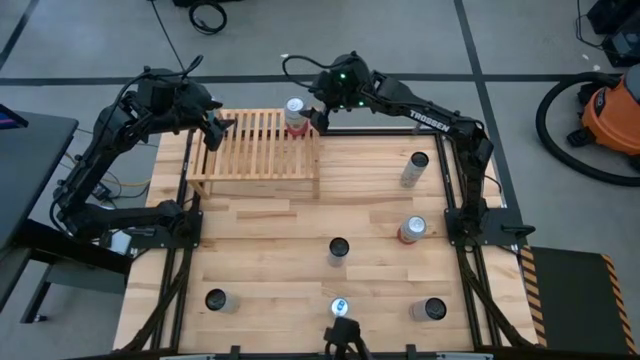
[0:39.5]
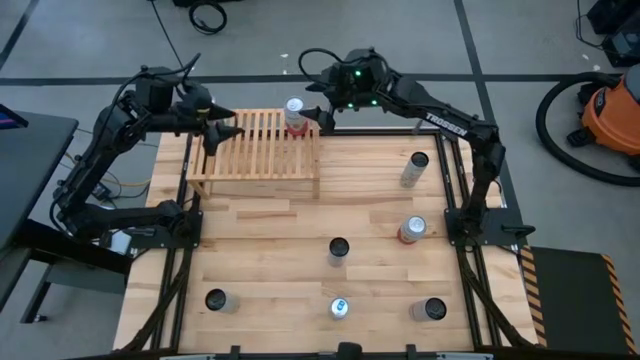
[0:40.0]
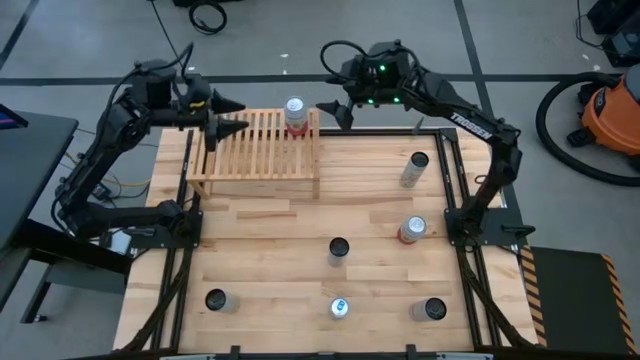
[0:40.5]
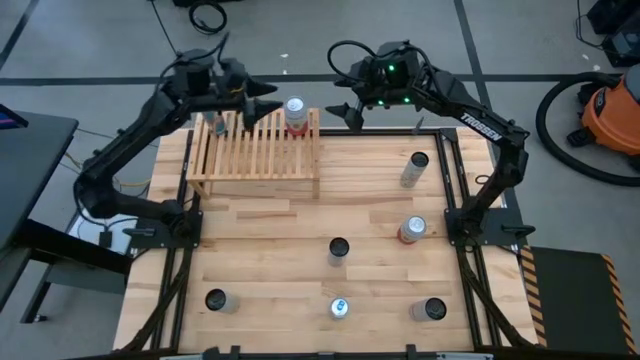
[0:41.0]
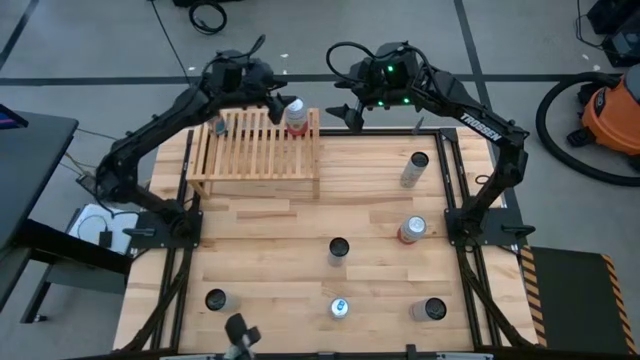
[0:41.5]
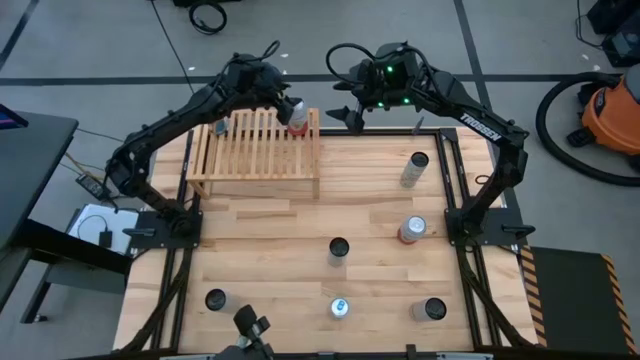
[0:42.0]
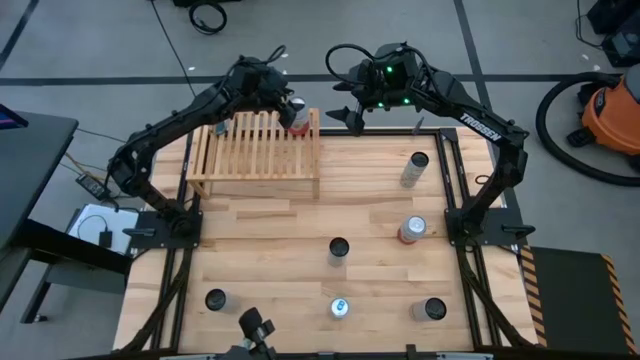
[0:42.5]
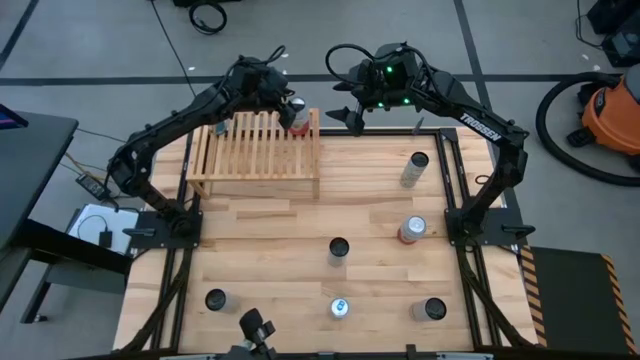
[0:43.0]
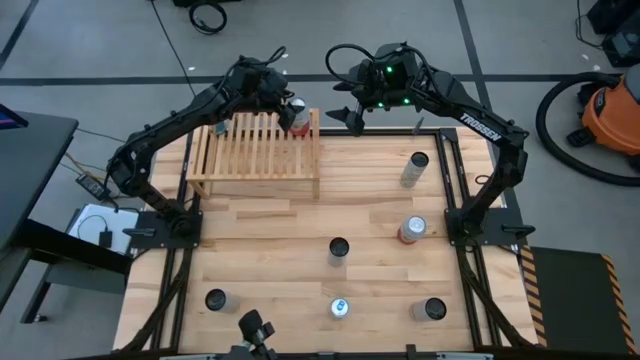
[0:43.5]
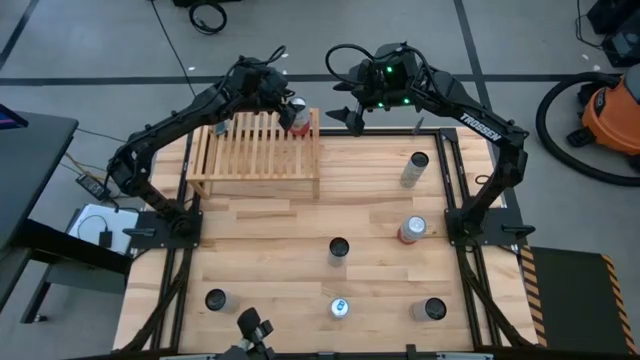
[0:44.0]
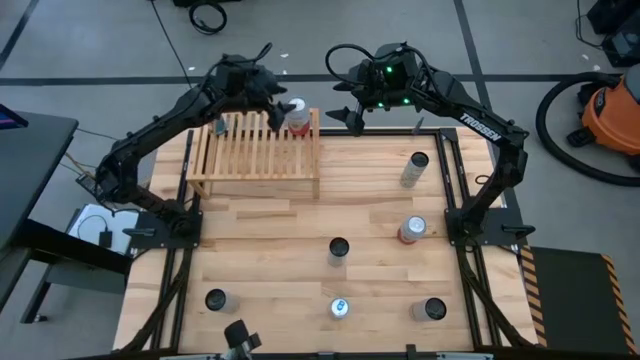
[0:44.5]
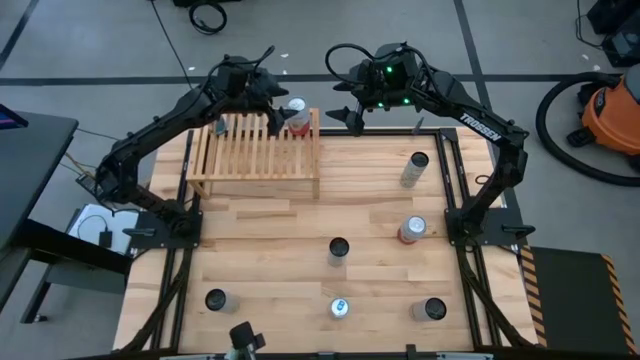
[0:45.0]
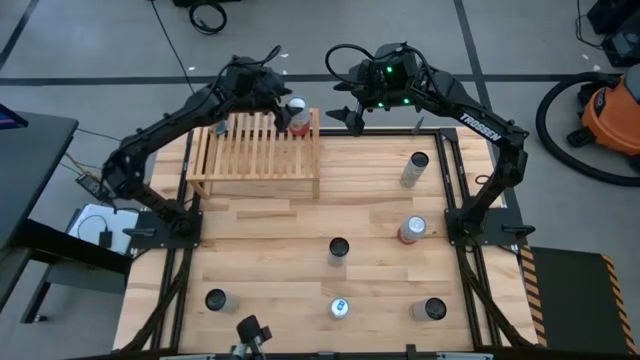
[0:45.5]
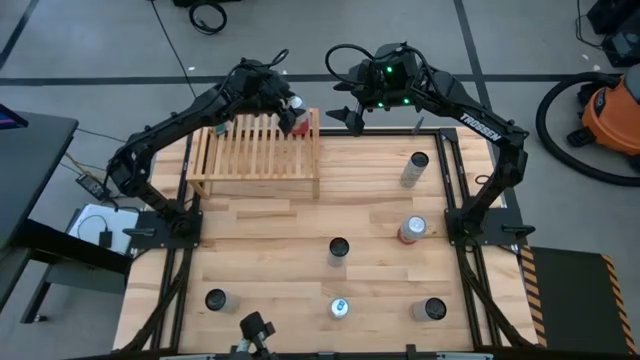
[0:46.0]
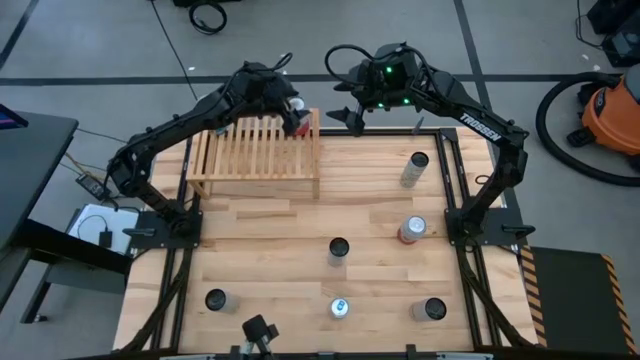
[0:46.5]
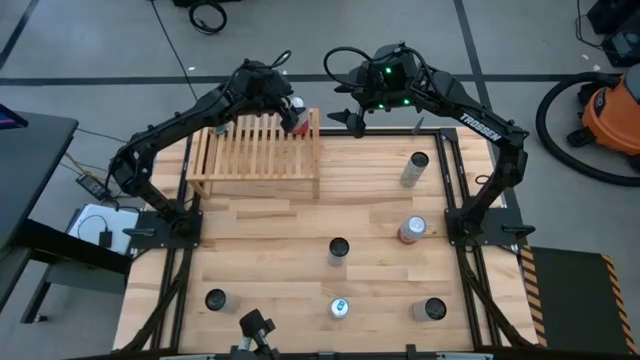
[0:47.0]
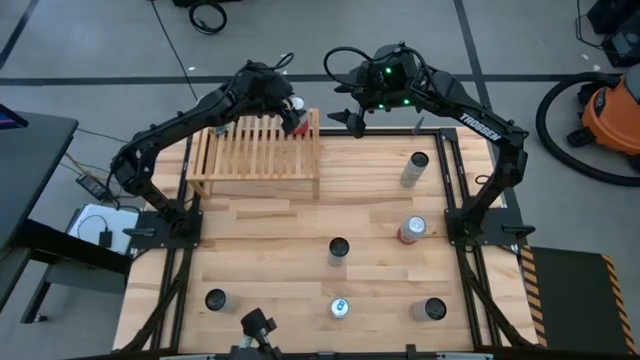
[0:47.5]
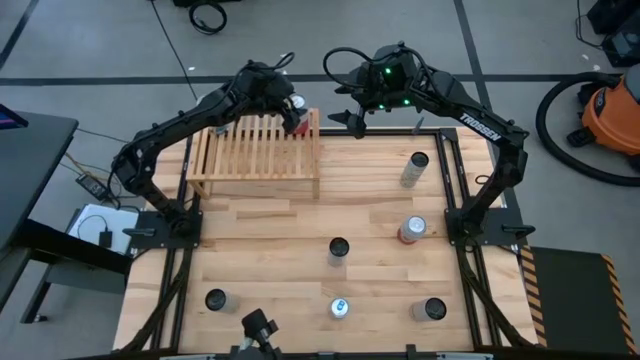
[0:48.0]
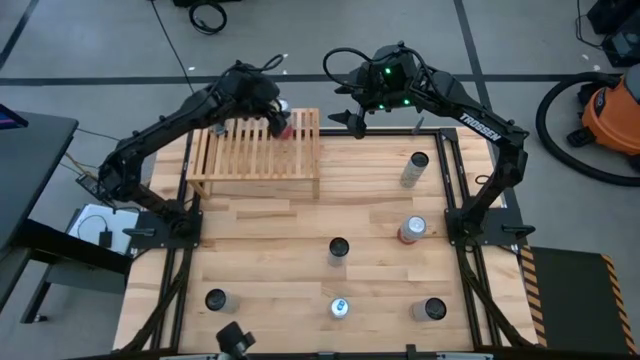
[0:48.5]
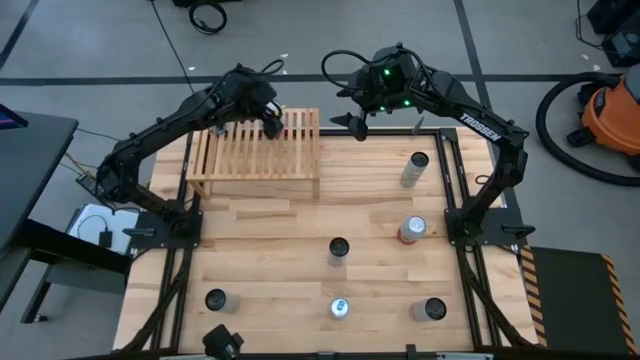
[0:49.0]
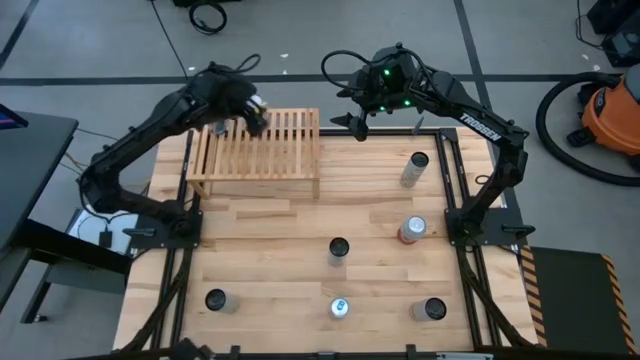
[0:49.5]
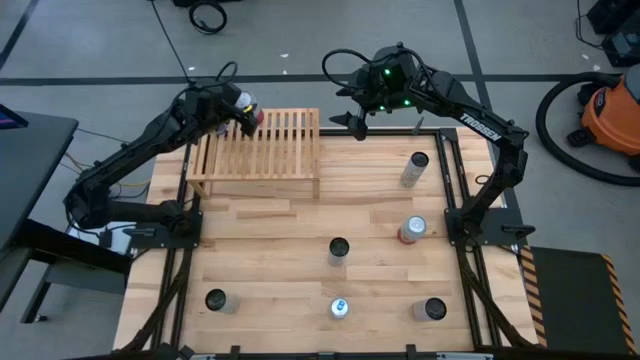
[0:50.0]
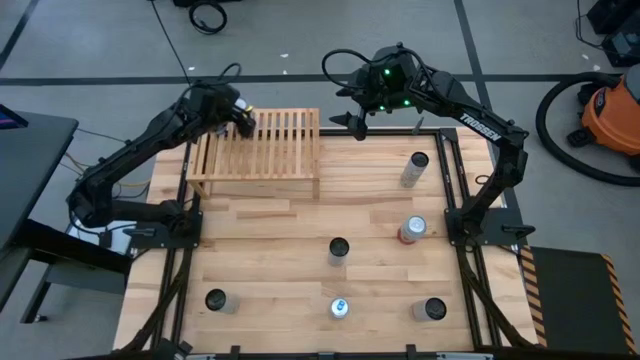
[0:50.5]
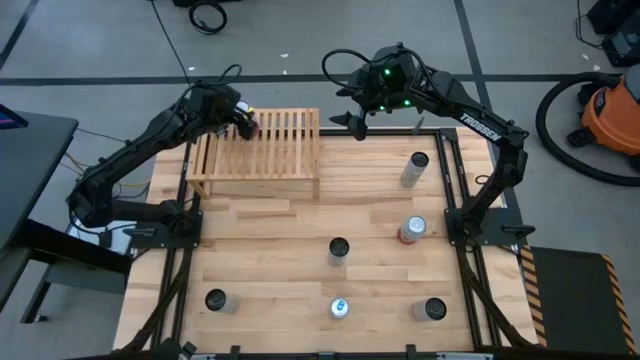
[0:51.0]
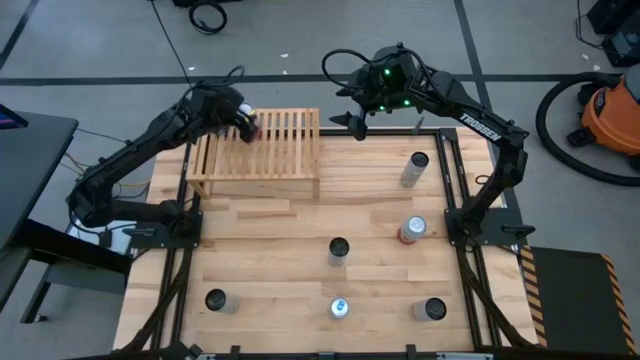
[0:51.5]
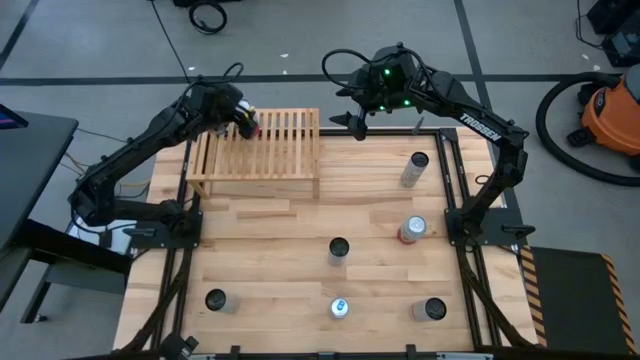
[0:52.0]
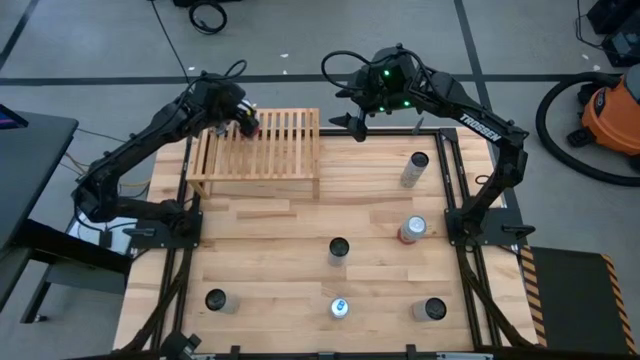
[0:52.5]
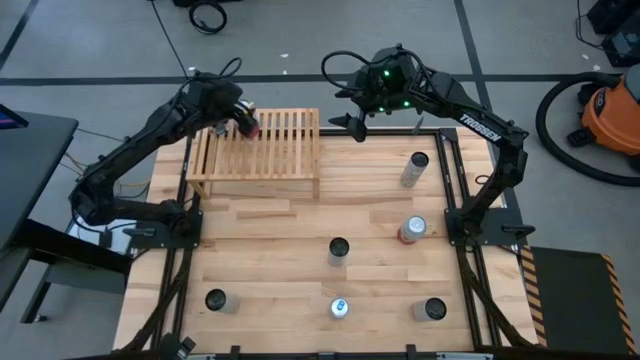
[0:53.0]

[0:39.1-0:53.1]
Task: Place canned beverage on shelf
Put the left pink and white soda can on the shelf aligned with the blue soda can

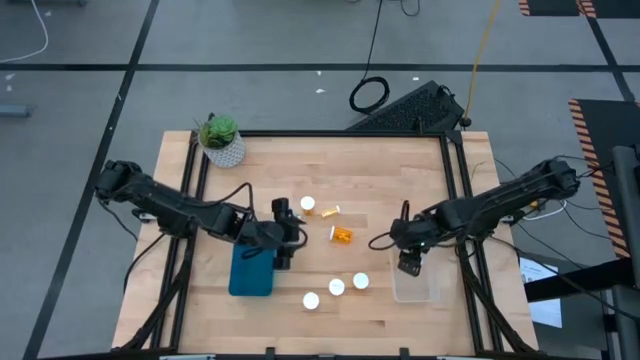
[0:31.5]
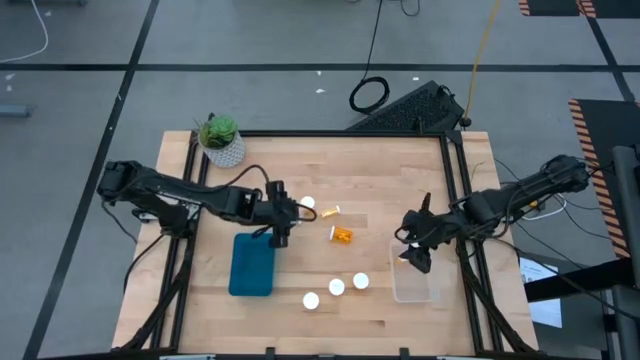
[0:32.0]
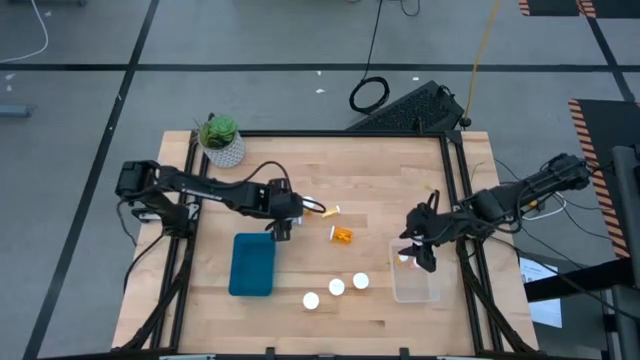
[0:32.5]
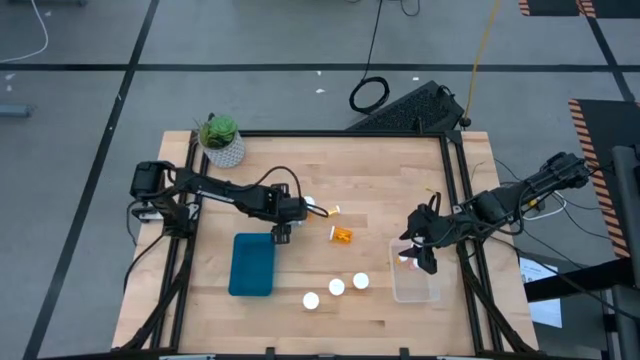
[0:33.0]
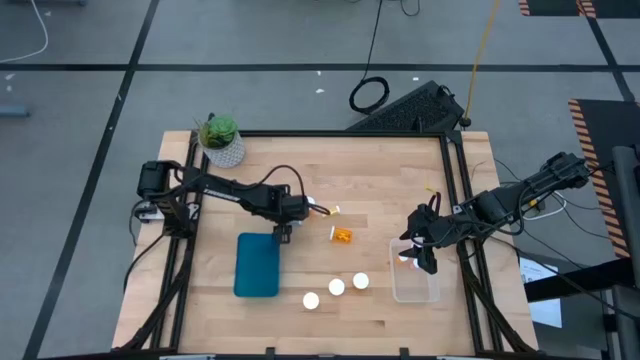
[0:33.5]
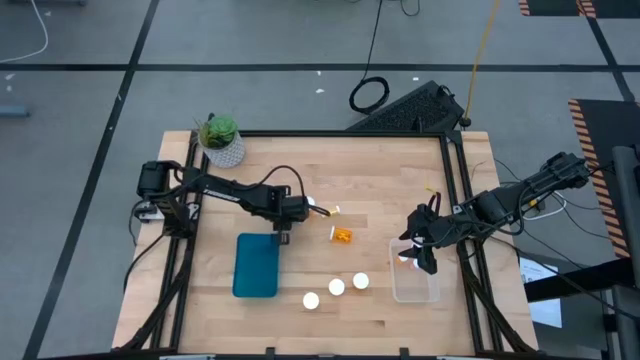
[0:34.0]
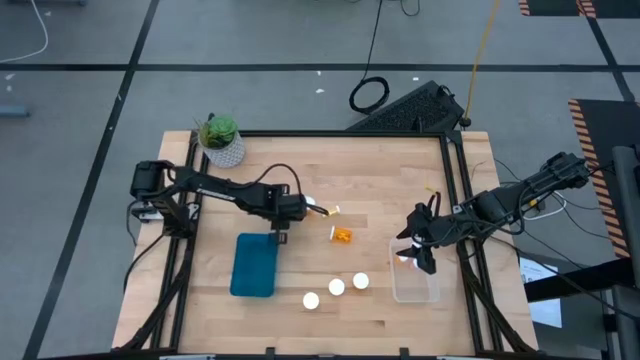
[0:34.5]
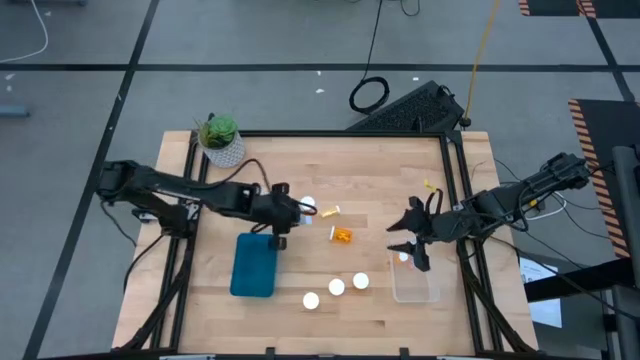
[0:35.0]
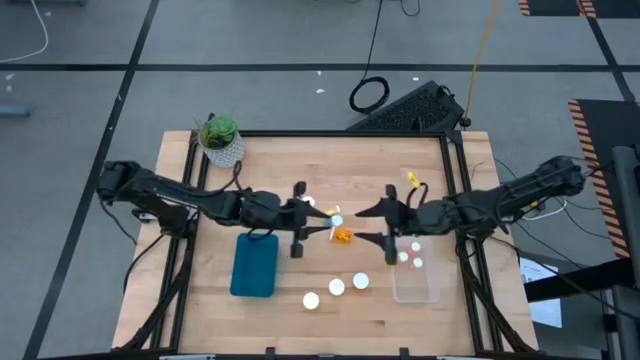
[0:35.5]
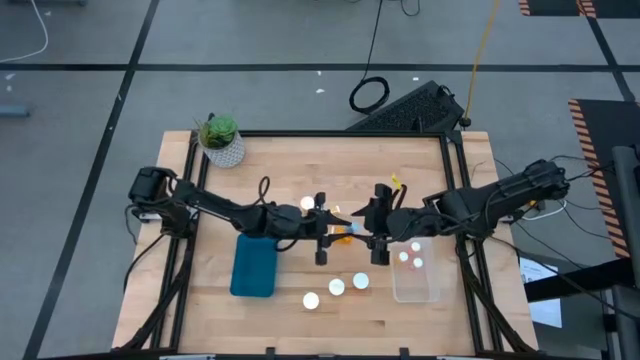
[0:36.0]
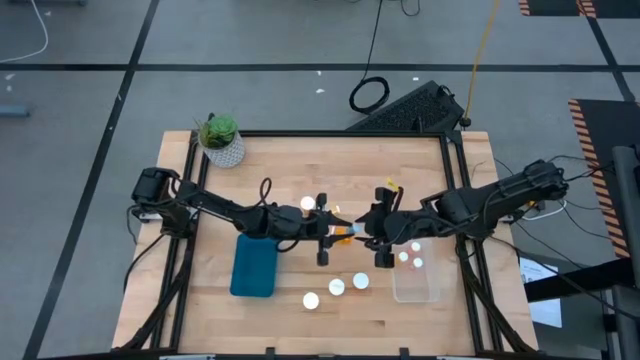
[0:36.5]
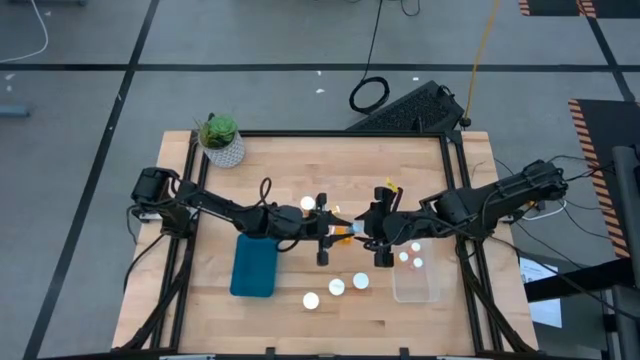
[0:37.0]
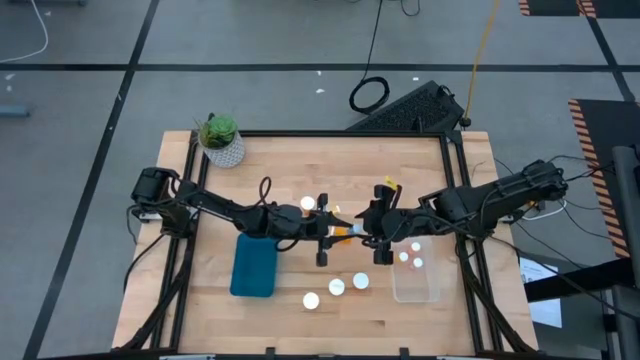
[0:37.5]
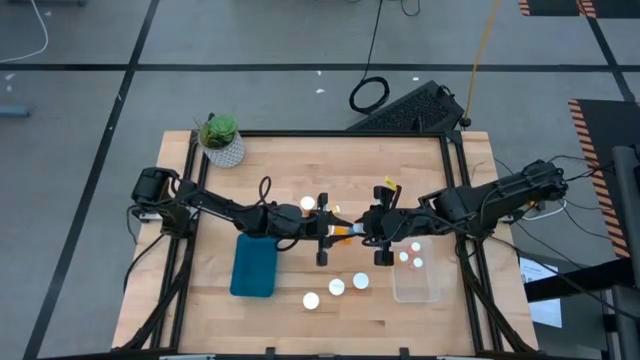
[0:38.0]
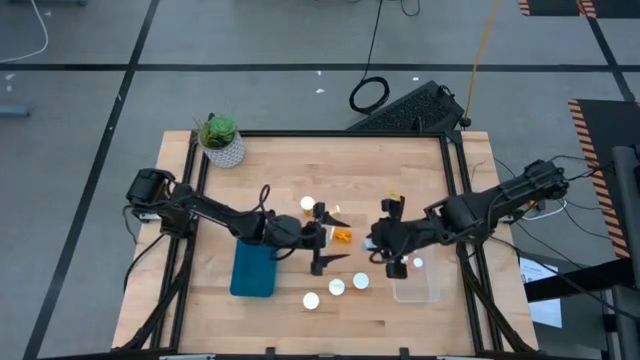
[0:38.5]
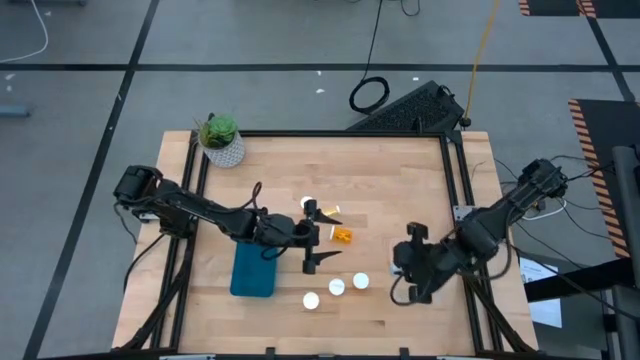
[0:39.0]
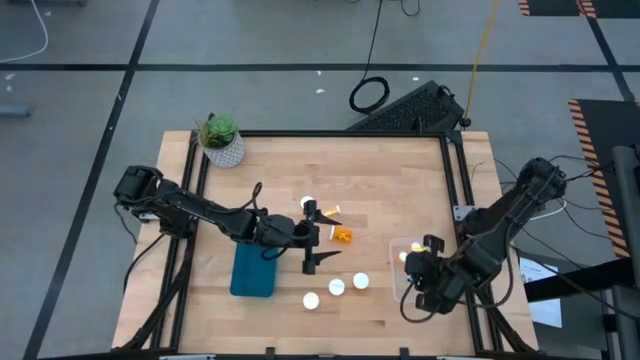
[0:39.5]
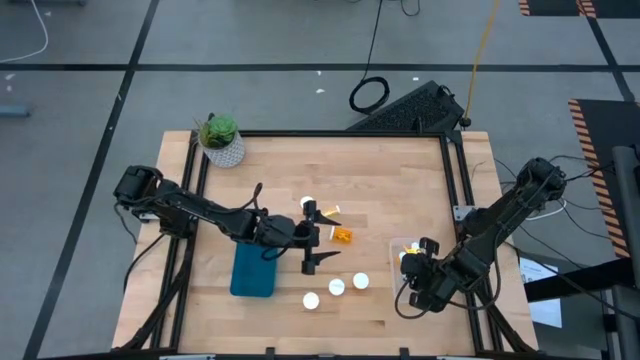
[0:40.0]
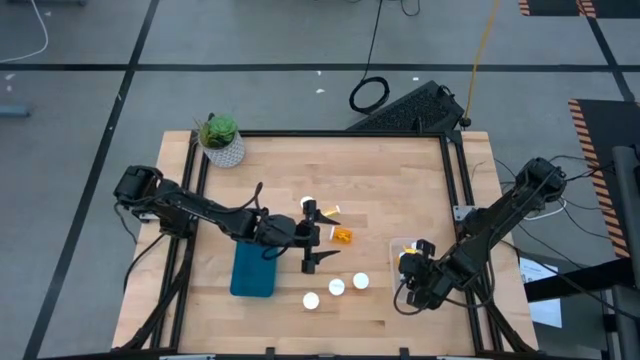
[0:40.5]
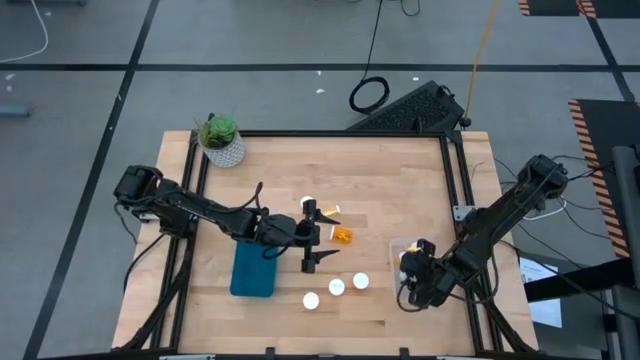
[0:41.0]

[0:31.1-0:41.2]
Task: Pick and place medicine bottles into bin by pill shape (circle, oval)
Put the blue bottled tablet into the transparent bin
